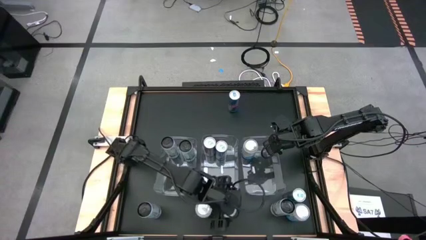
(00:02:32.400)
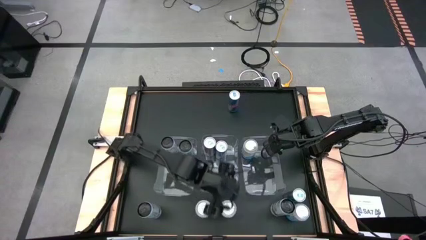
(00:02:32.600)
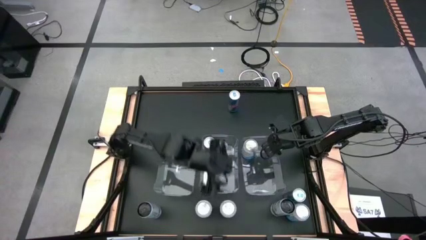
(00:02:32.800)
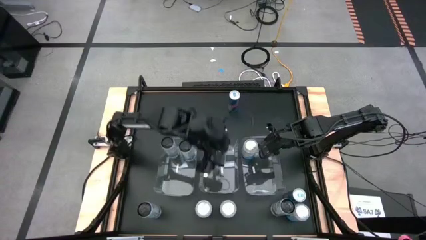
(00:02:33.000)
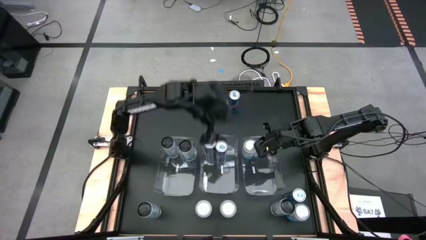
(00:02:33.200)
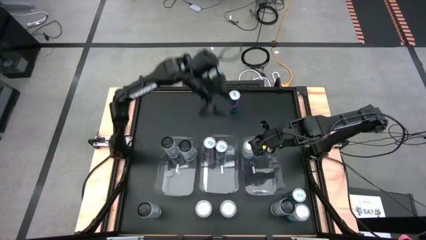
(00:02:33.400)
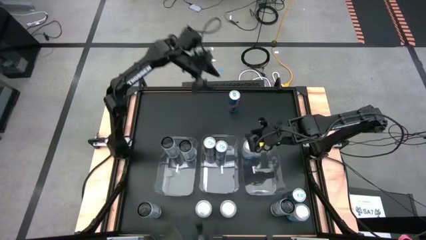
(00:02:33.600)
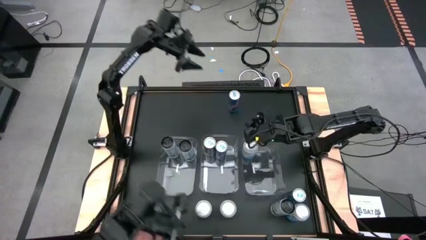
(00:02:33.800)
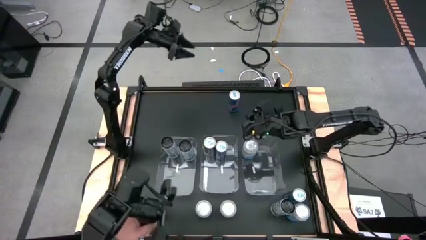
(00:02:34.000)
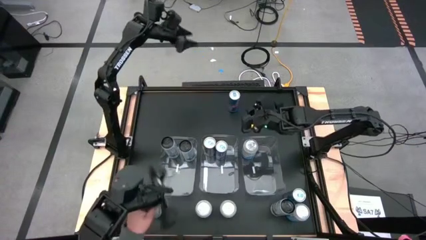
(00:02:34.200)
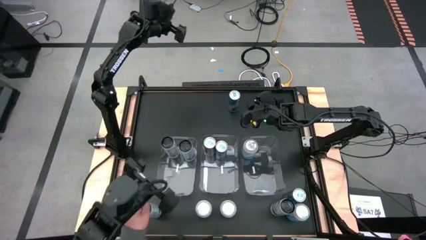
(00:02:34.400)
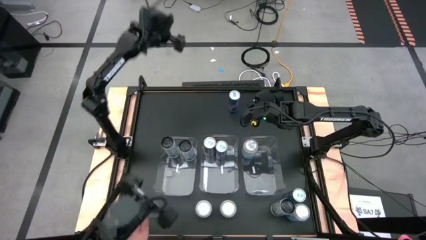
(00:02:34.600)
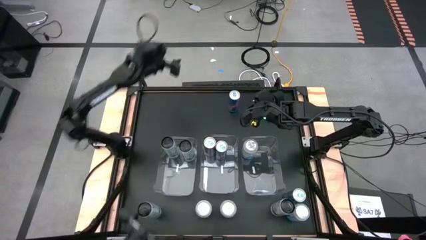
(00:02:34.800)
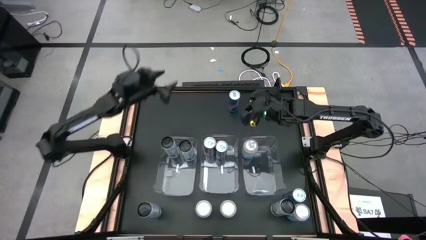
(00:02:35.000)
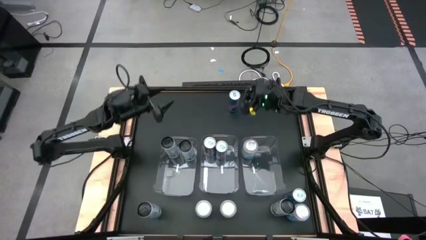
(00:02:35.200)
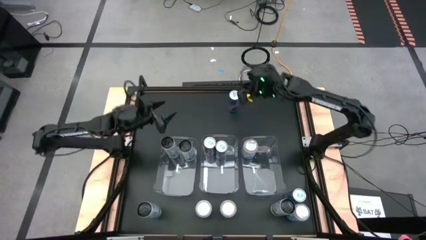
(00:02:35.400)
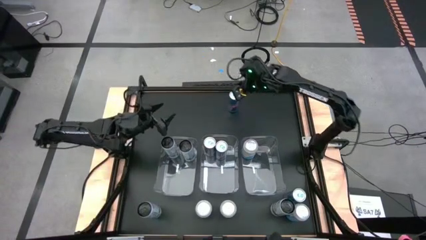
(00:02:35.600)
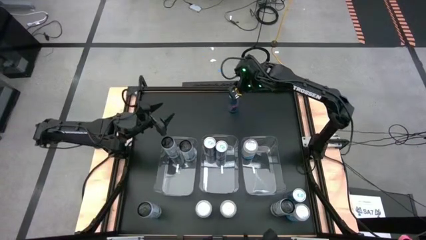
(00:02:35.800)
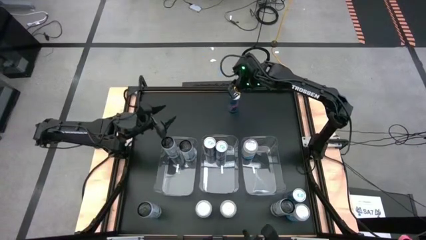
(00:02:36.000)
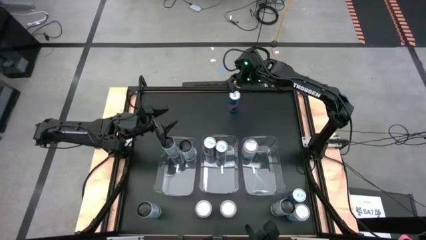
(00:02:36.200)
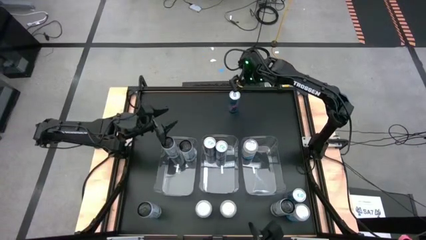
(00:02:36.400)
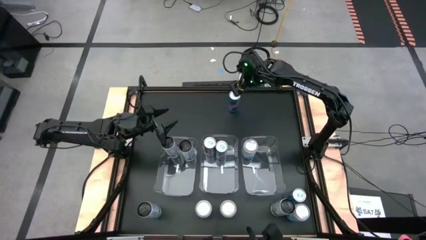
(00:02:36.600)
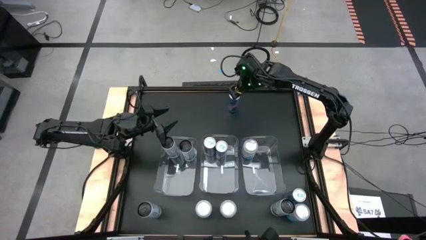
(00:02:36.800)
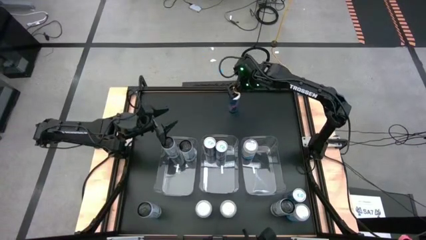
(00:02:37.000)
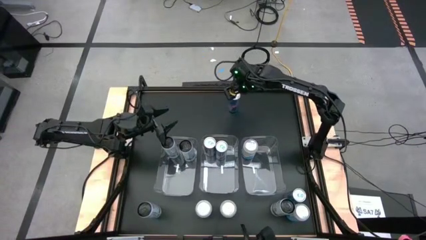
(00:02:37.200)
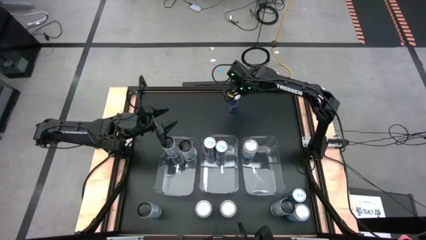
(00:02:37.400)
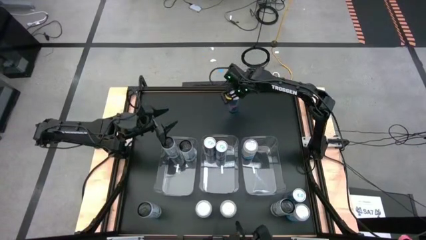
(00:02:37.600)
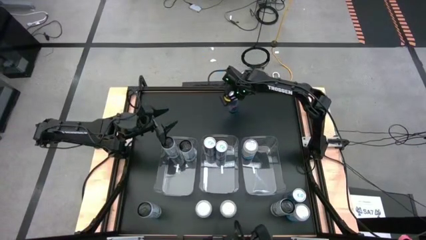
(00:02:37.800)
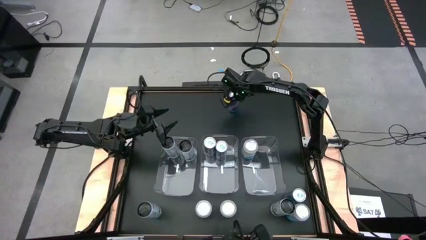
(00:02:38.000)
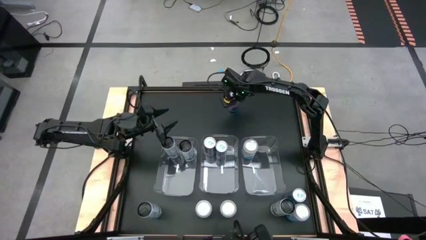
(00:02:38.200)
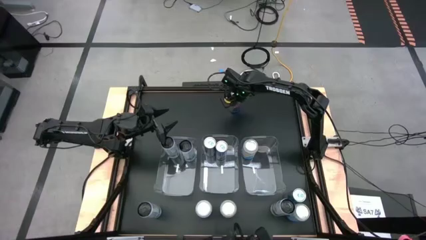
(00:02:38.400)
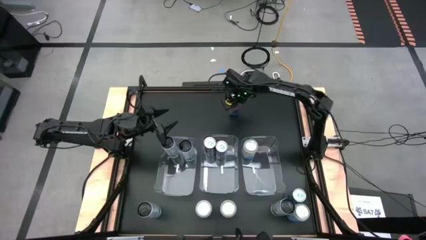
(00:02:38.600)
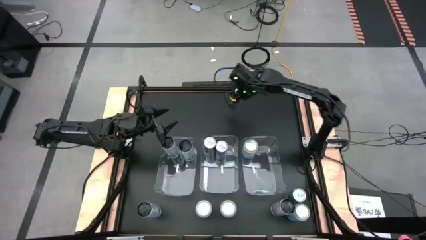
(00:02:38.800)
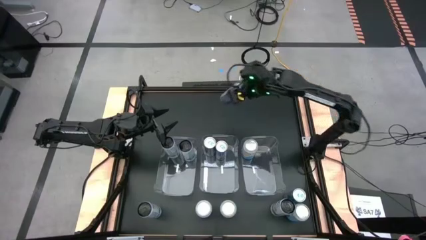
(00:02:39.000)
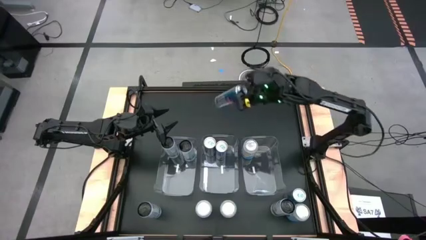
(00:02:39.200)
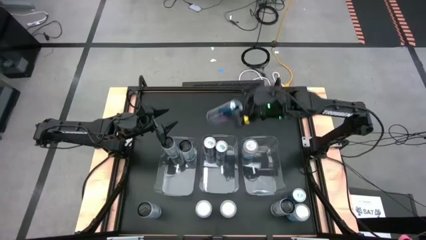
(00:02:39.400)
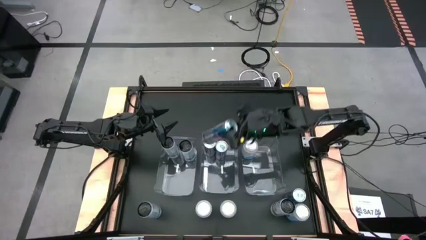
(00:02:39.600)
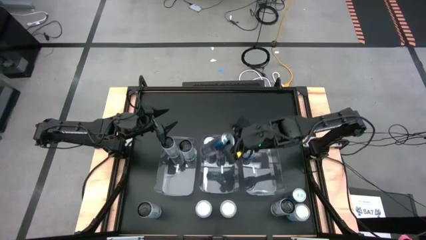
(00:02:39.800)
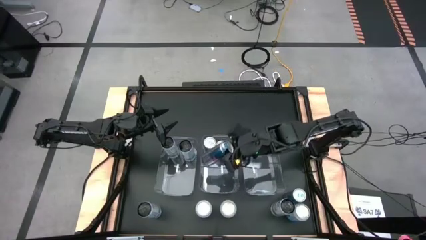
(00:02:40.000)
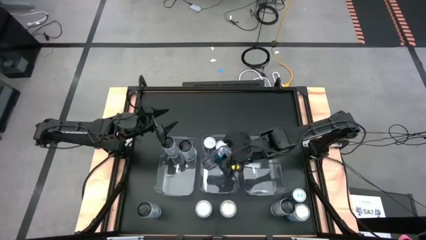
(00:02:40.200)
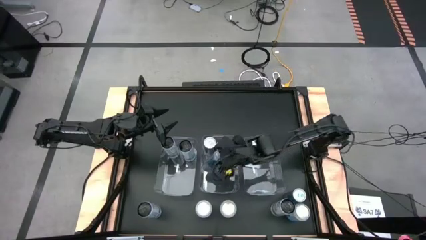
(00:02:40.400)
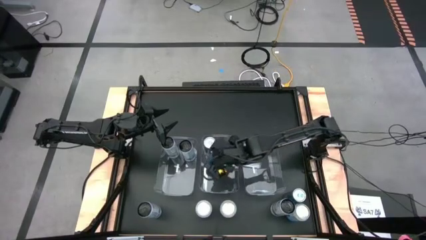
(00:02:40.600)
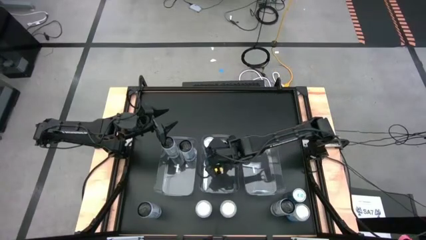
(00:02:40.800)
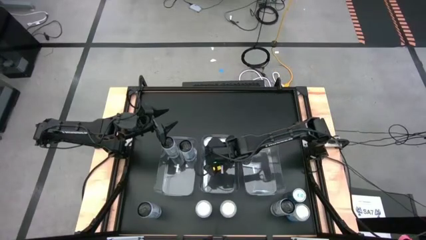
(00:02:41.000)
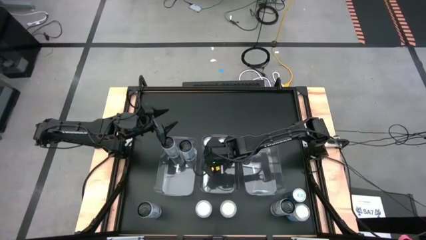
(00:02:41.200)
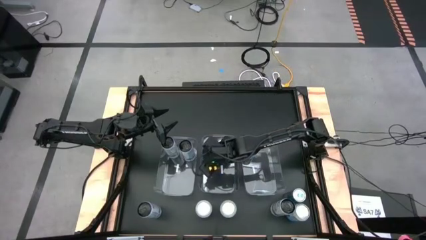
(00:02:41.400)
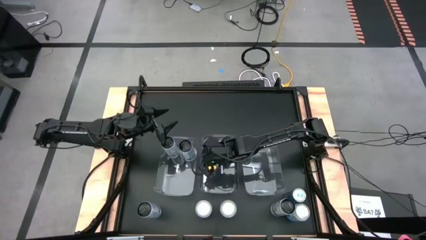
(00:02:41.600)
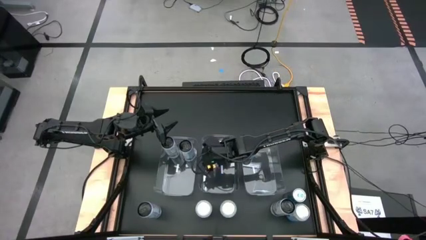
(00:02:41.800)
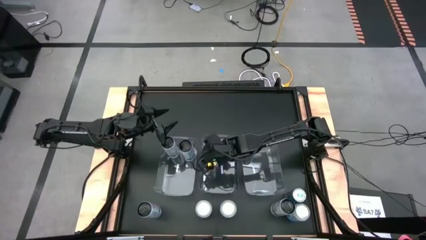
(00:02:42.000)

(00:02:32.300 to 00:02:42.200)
Task: Sort soda cans
Put the top blue soda can into the middle transparent bin

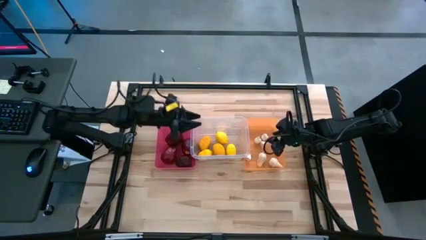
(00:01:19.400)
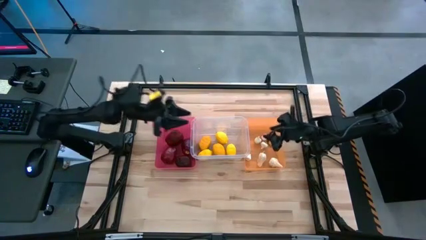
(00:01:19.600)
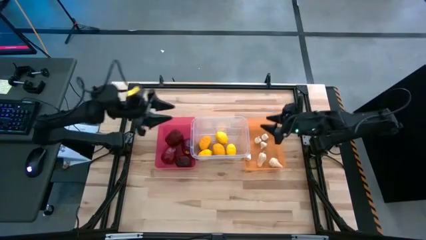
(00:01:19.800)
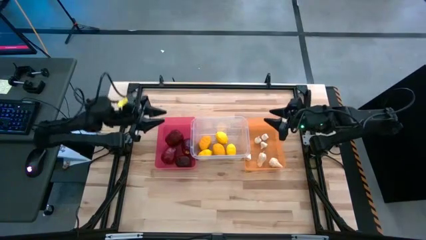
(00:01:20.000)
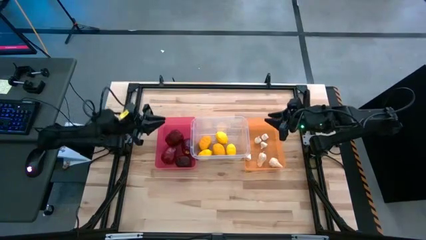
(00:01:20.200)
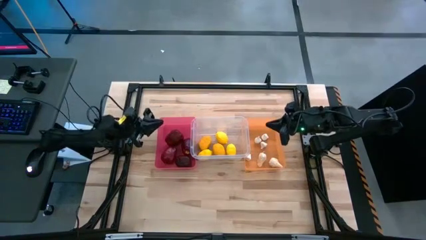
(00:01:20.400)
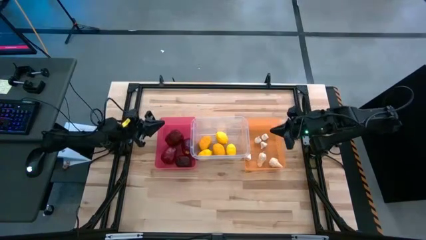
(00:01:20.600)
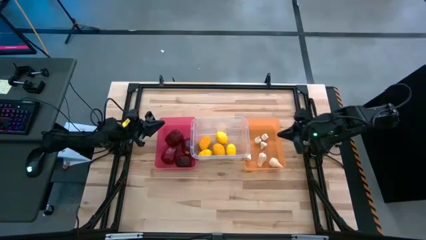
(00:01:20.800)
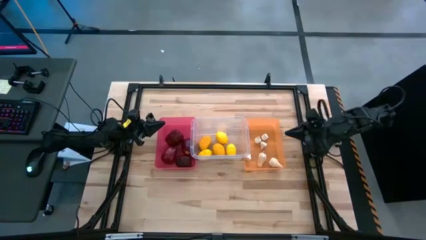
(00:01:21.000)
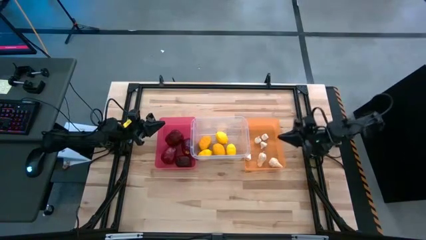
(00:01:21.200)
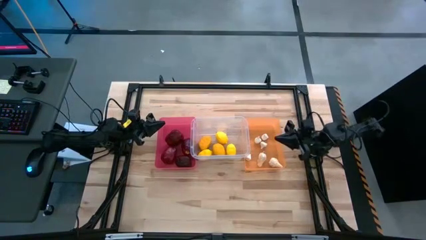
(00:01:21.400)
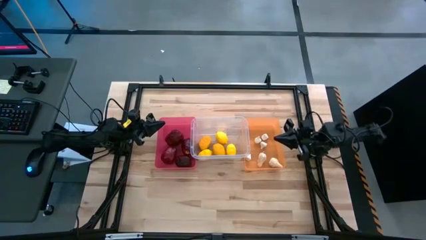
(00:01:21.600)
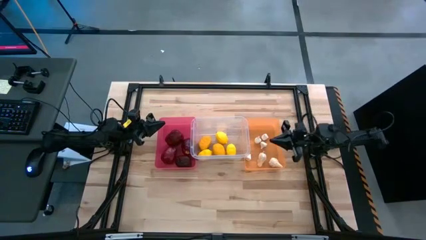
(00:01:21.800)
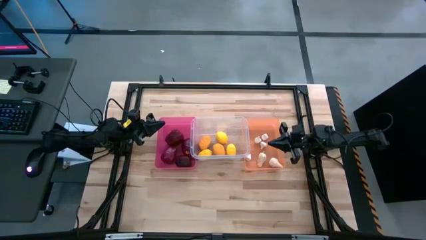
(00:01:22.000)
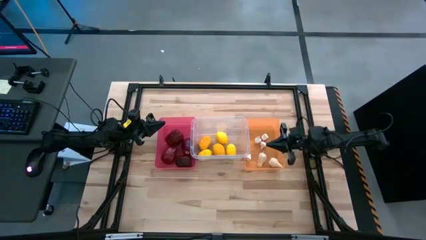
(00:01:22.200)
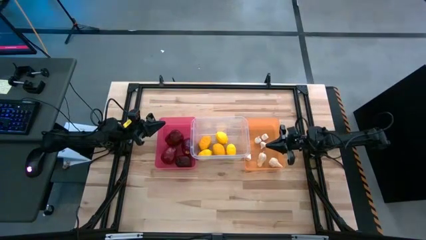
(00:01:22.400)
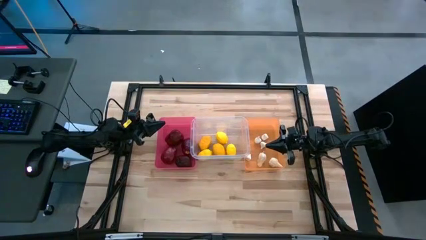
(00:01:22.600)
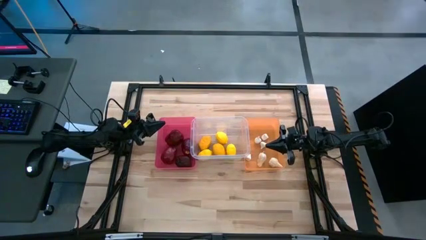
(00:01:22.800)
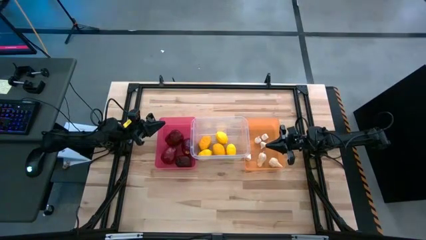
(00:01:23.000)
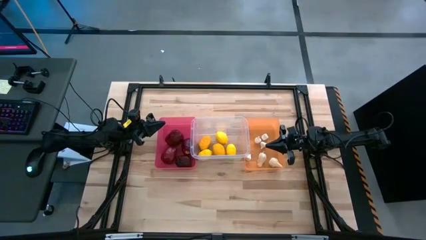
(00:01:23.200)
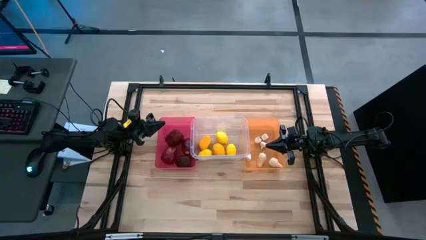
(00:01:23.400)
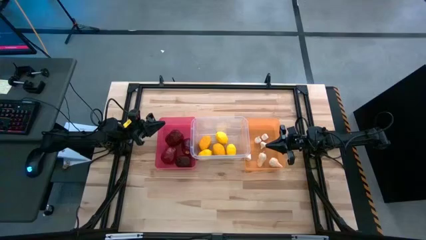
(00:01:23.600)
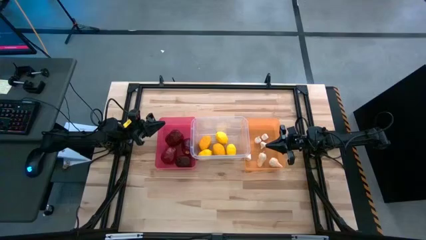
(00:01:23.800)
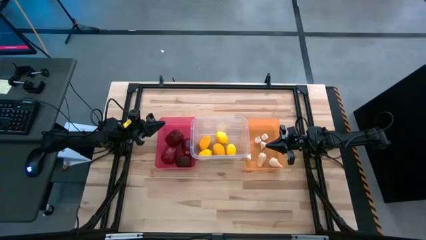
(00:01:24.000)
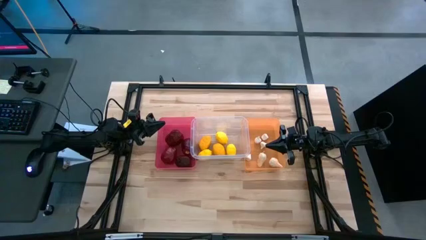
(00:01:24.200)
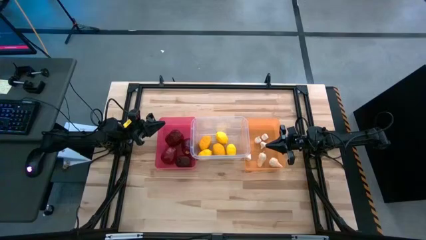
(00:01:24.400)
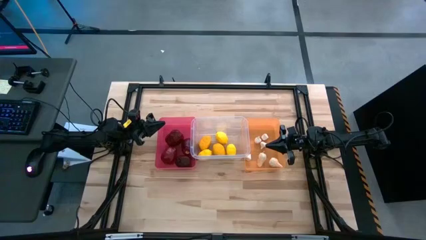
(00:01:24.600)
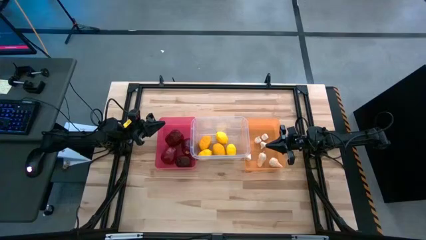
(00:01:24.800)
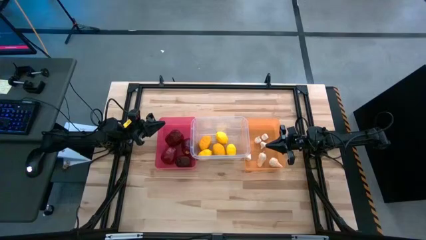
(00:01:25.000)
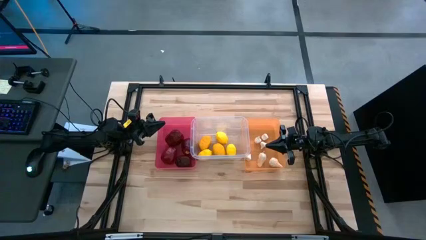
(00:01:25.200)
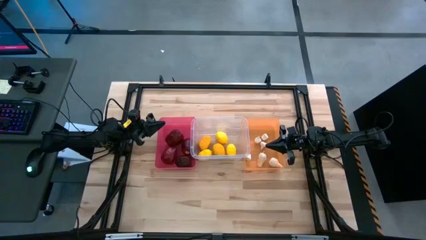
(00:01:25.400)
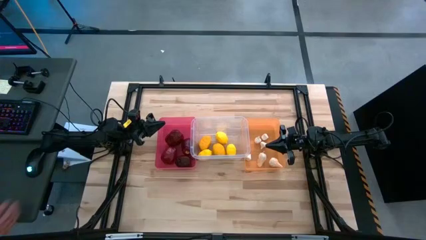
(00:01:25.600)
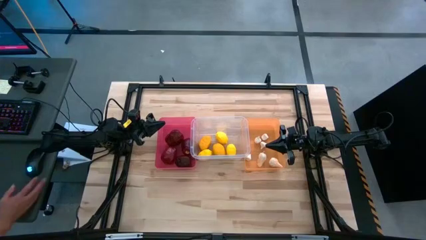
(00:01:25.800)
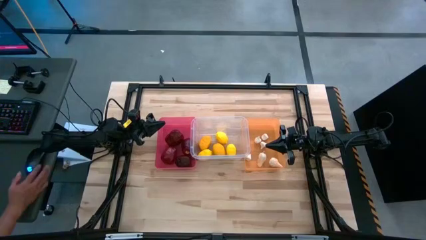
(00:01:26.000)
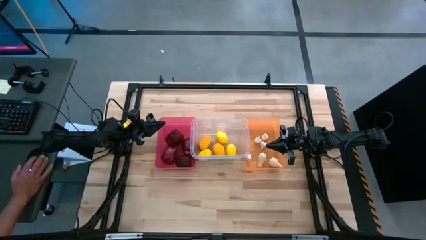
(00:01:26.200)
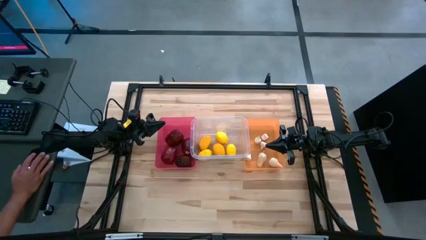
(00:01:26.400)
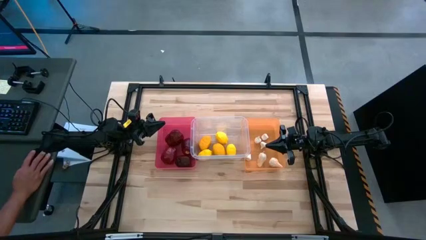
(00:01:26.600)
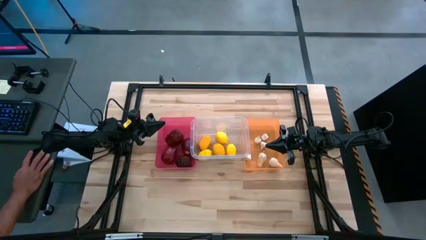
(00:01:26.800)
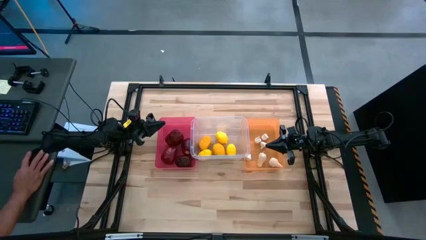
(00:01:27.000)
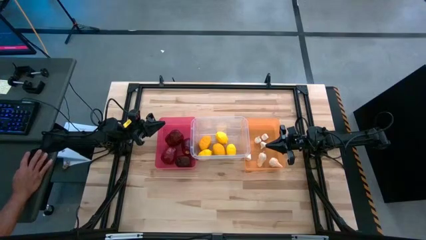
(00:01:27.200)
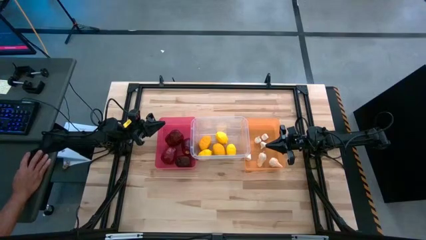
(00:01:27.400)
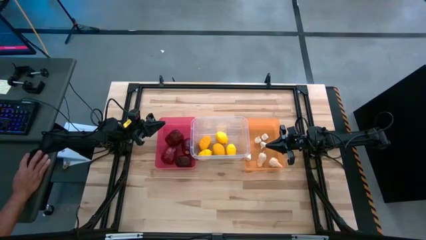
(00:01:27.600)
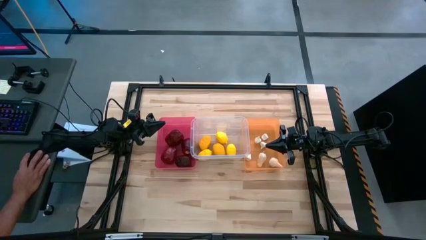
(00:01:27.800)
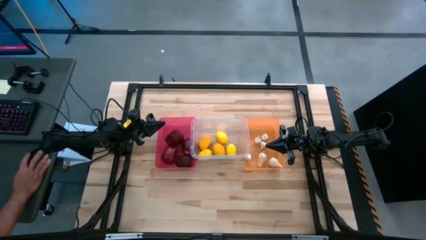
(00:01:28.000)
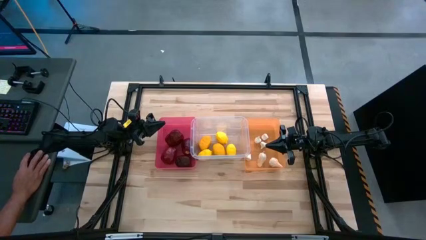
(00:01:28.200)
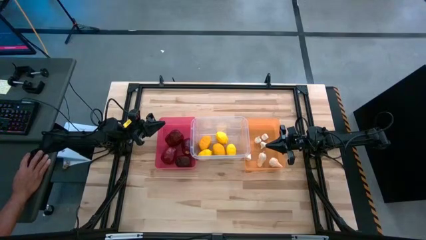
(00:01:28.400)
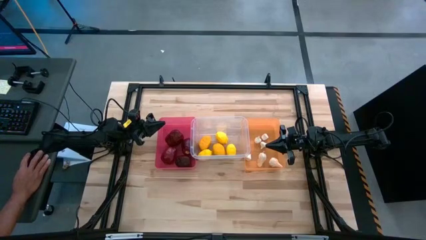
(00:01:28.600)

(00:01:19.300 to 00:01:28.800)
Task: Sort produce into baskets
Return to Home Position
